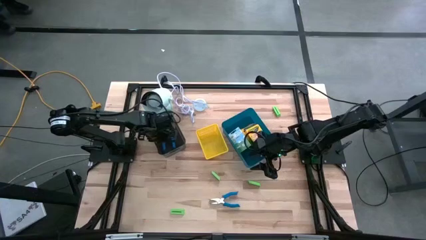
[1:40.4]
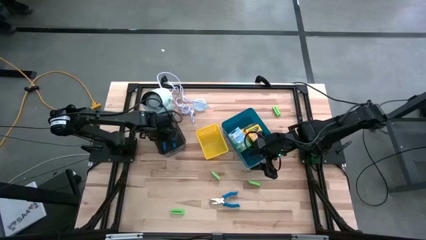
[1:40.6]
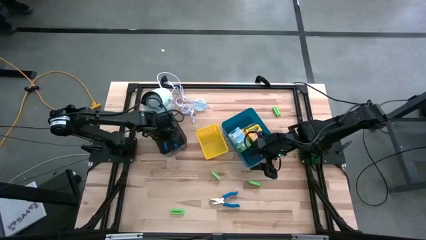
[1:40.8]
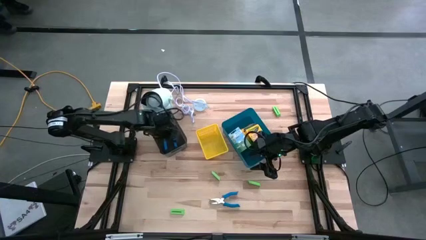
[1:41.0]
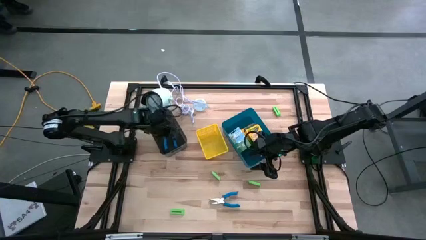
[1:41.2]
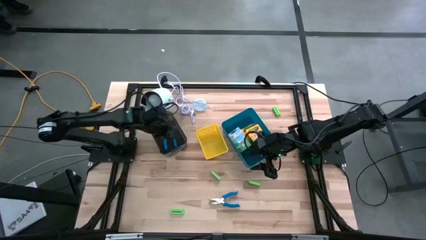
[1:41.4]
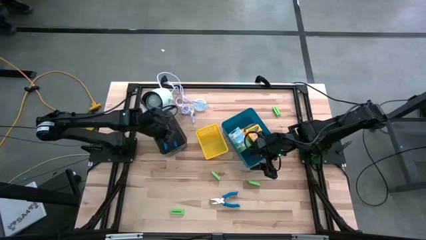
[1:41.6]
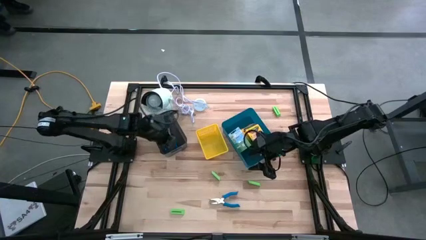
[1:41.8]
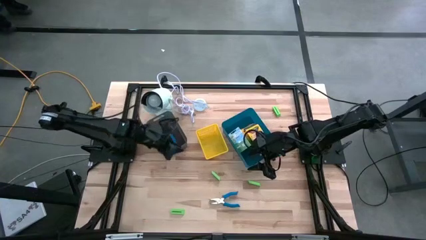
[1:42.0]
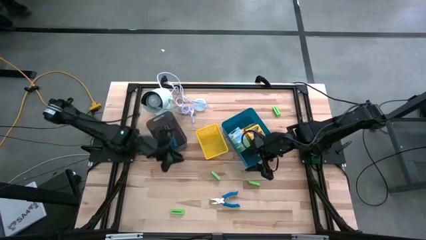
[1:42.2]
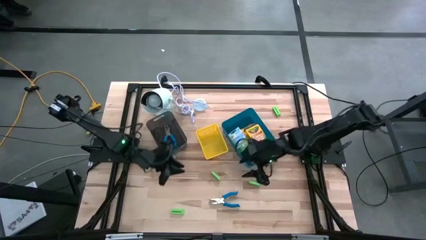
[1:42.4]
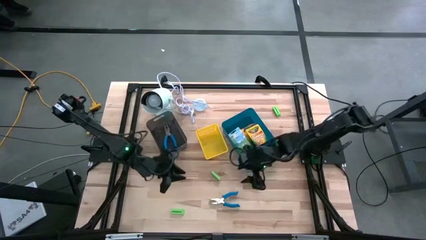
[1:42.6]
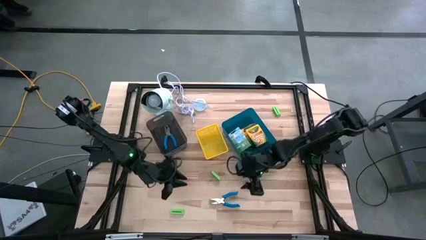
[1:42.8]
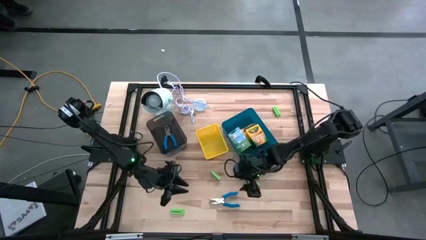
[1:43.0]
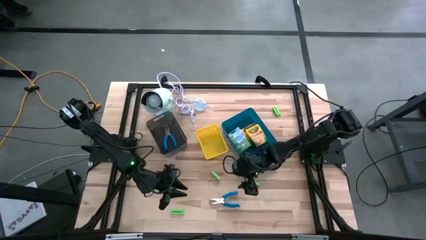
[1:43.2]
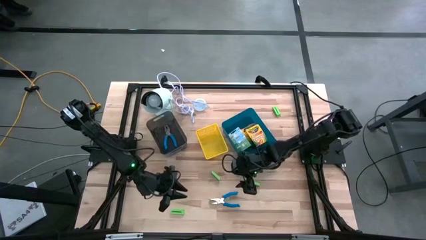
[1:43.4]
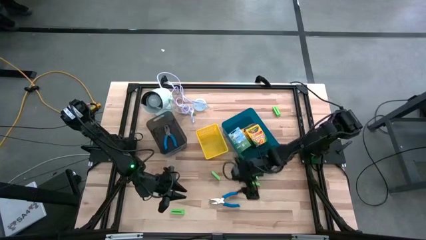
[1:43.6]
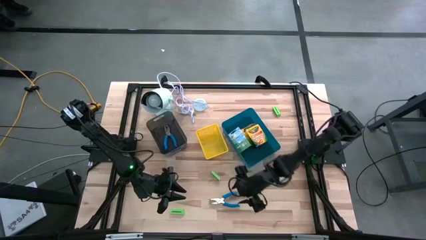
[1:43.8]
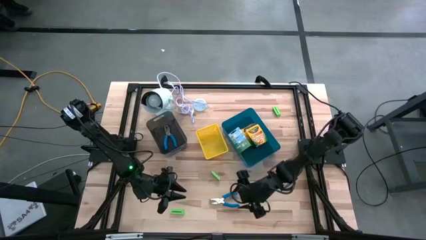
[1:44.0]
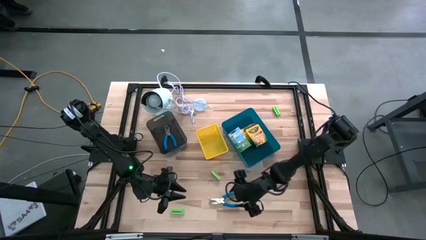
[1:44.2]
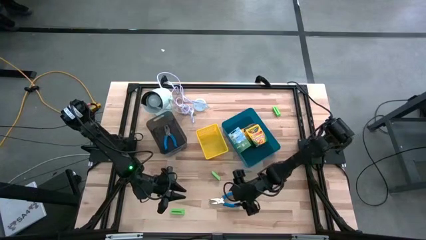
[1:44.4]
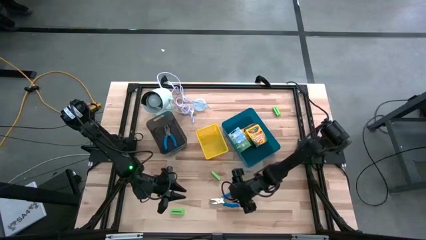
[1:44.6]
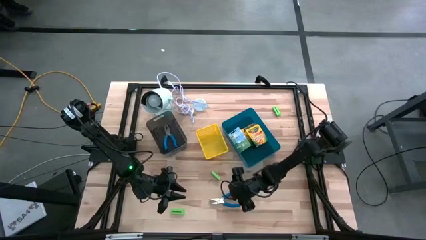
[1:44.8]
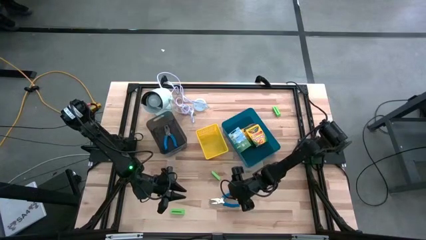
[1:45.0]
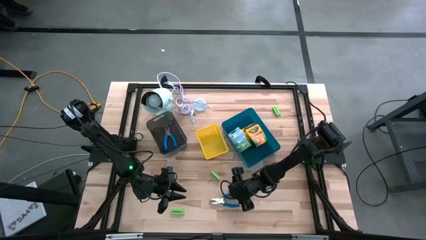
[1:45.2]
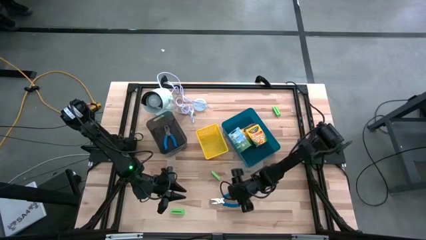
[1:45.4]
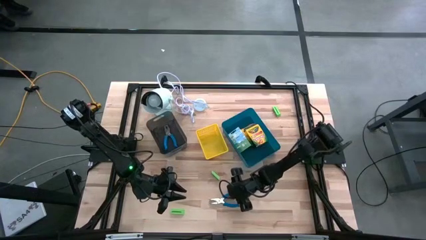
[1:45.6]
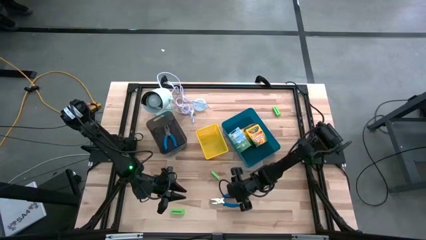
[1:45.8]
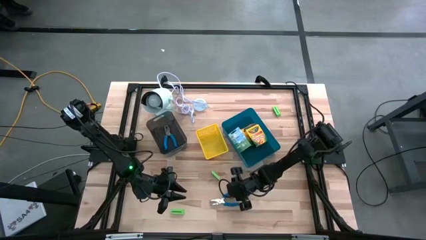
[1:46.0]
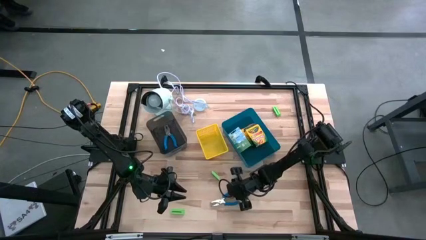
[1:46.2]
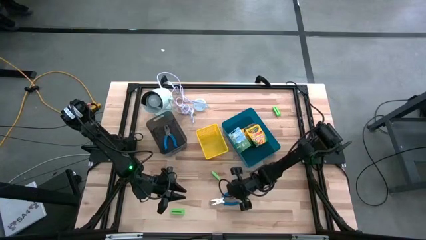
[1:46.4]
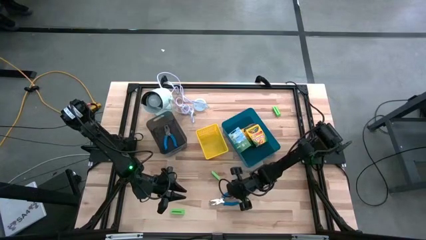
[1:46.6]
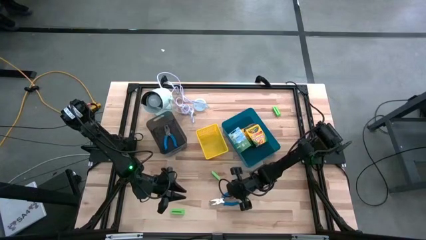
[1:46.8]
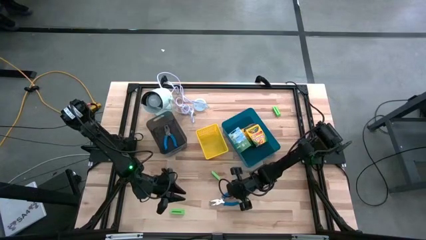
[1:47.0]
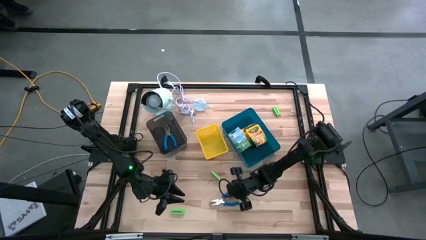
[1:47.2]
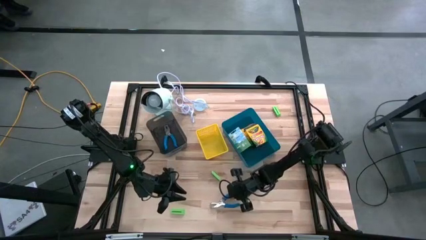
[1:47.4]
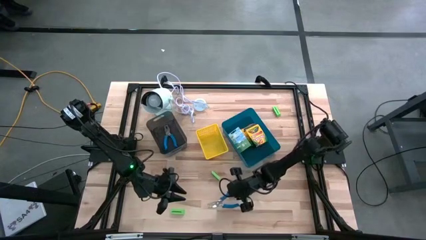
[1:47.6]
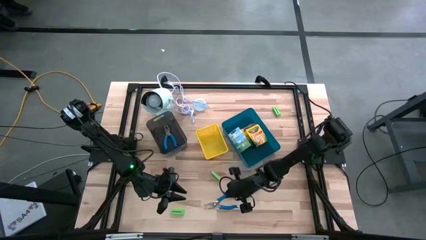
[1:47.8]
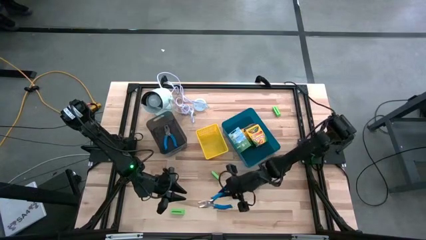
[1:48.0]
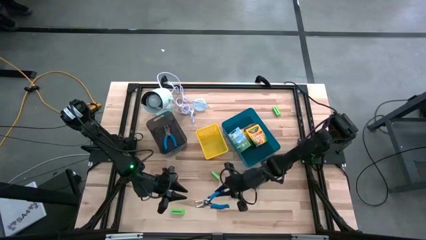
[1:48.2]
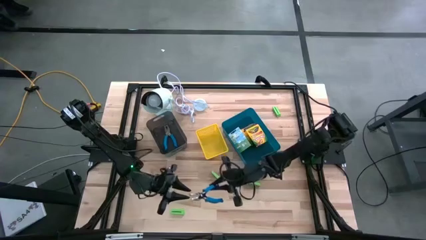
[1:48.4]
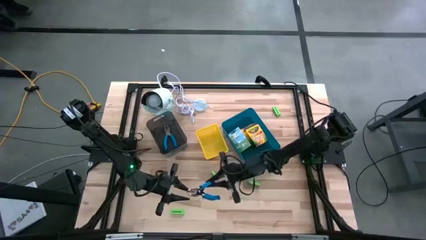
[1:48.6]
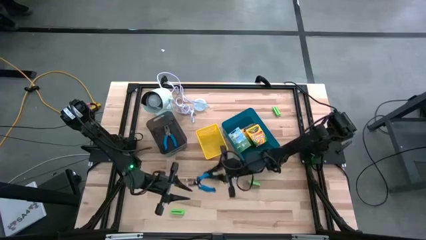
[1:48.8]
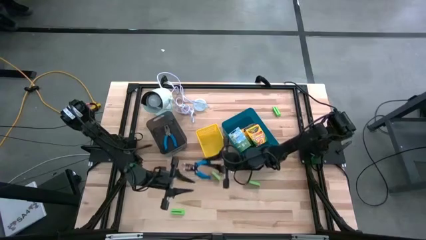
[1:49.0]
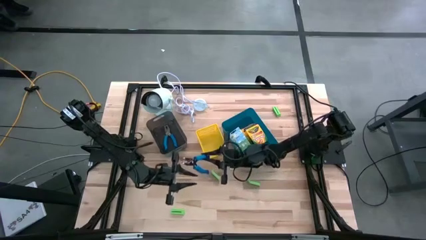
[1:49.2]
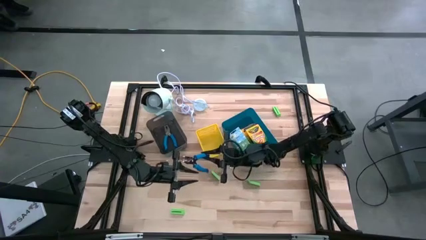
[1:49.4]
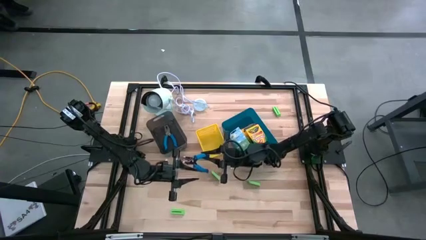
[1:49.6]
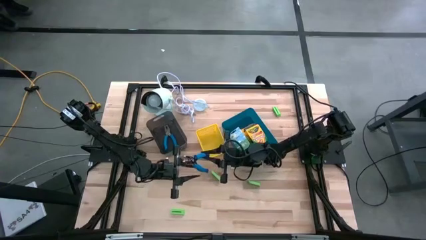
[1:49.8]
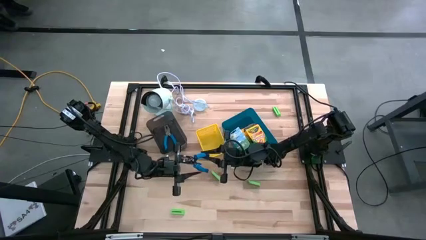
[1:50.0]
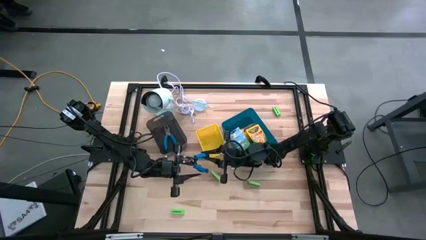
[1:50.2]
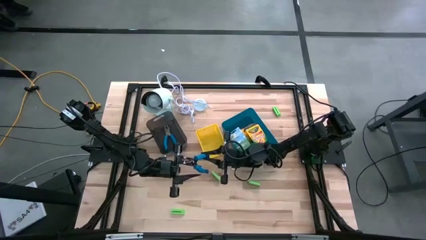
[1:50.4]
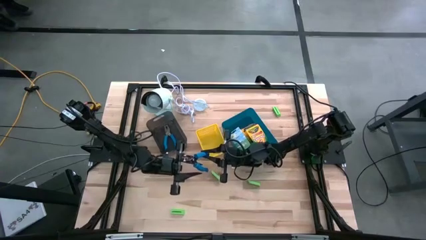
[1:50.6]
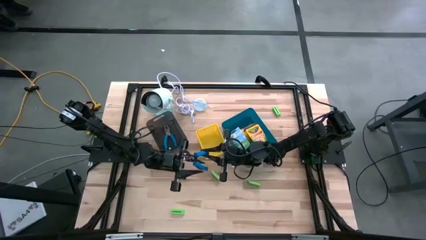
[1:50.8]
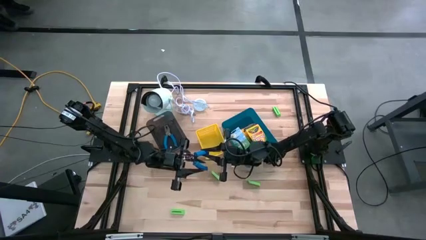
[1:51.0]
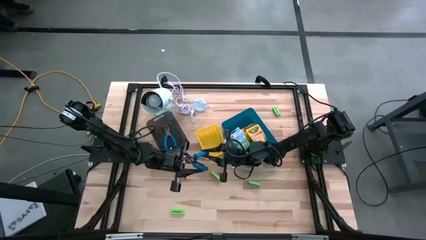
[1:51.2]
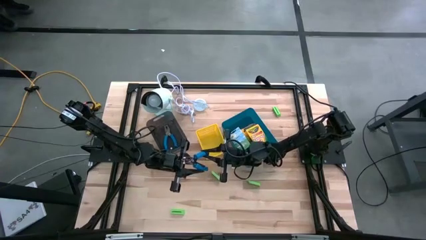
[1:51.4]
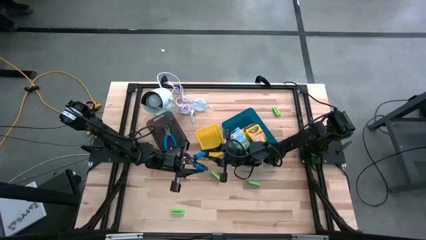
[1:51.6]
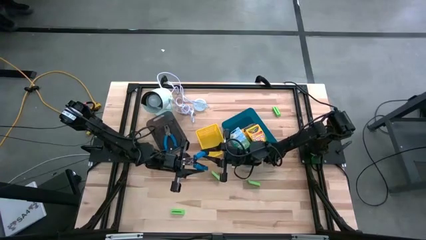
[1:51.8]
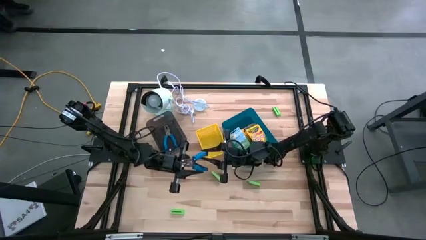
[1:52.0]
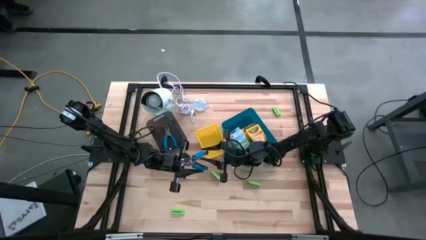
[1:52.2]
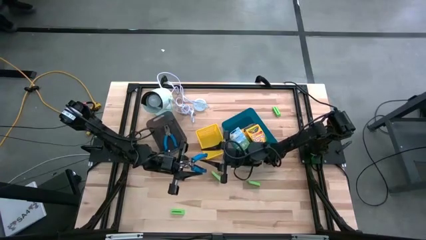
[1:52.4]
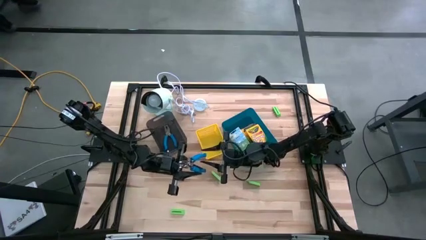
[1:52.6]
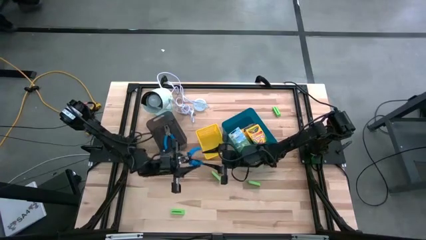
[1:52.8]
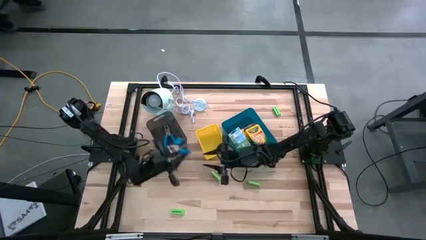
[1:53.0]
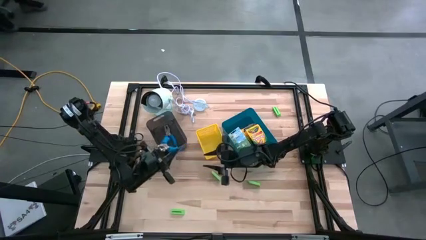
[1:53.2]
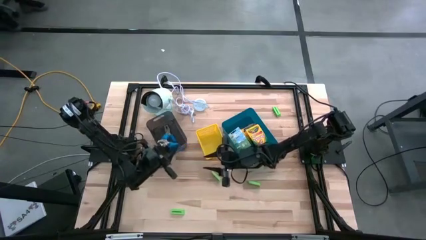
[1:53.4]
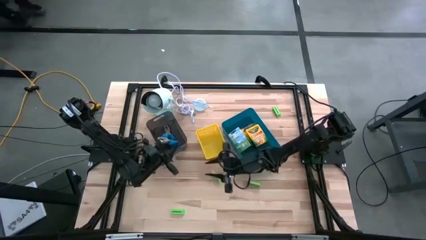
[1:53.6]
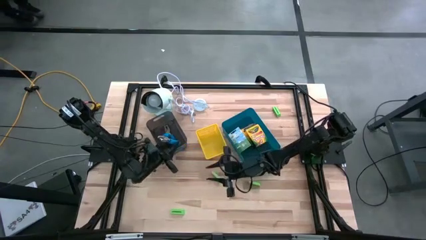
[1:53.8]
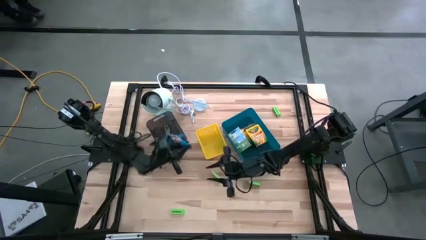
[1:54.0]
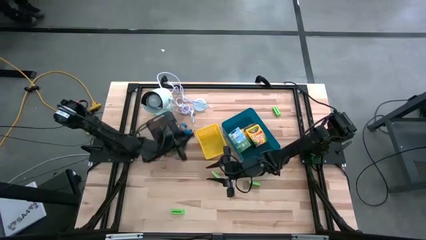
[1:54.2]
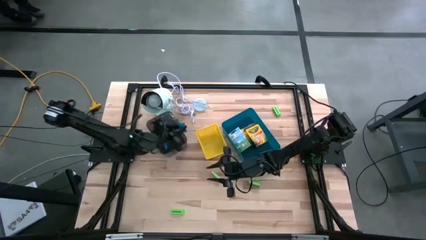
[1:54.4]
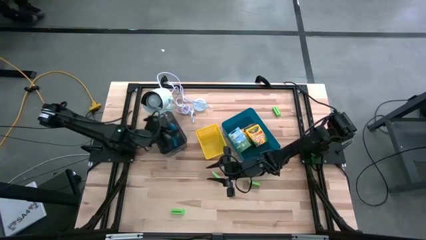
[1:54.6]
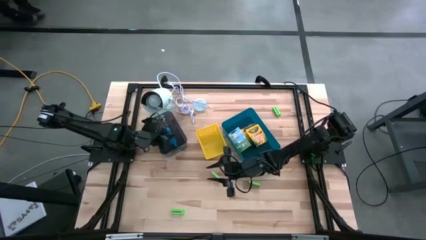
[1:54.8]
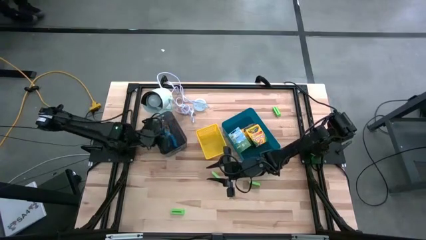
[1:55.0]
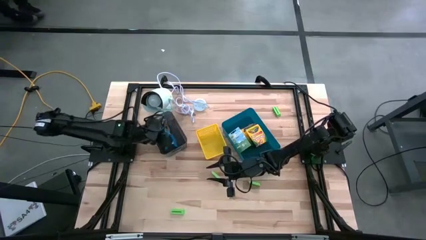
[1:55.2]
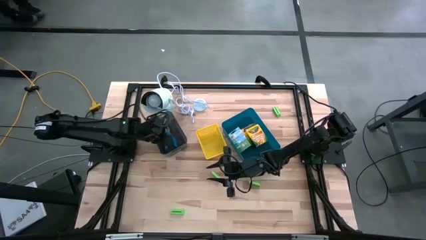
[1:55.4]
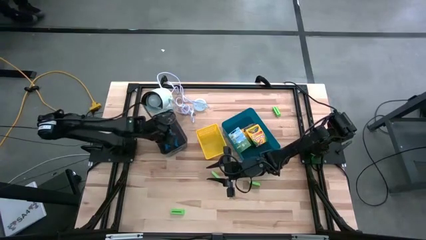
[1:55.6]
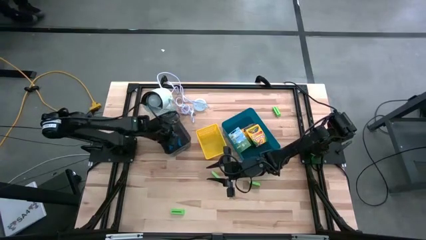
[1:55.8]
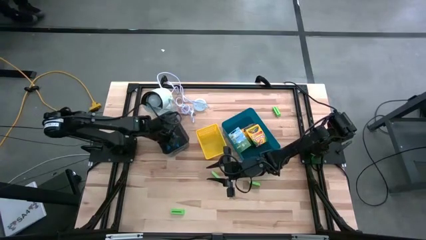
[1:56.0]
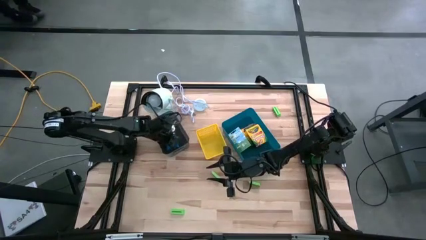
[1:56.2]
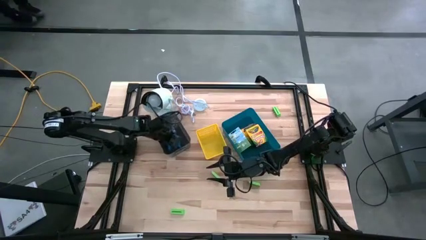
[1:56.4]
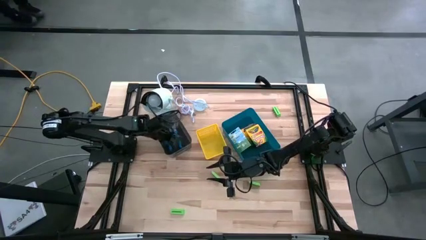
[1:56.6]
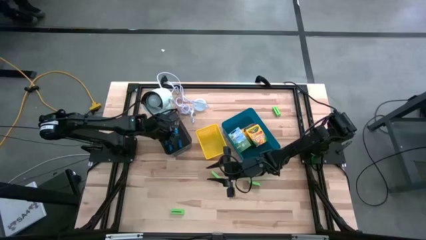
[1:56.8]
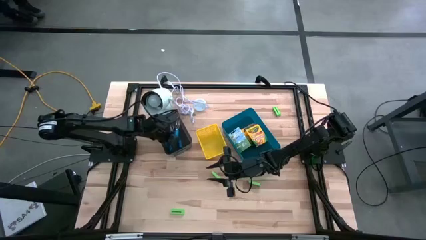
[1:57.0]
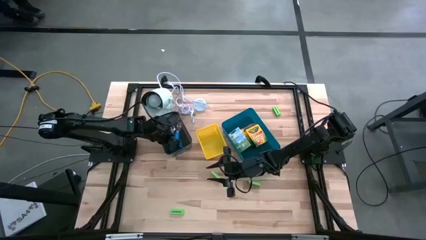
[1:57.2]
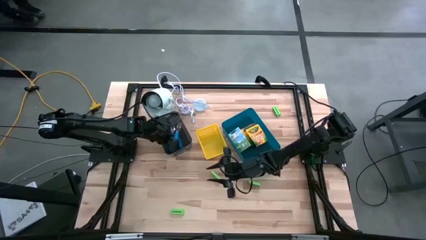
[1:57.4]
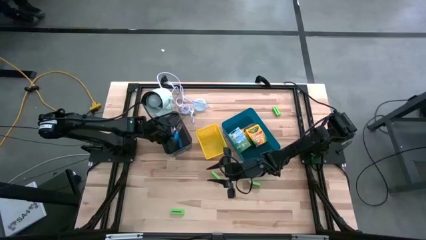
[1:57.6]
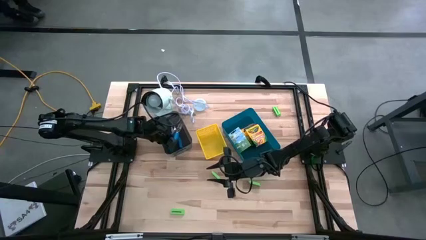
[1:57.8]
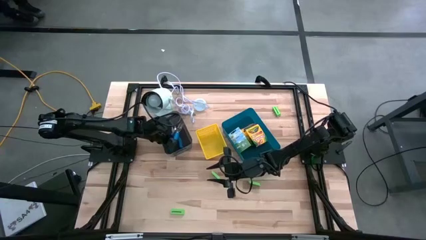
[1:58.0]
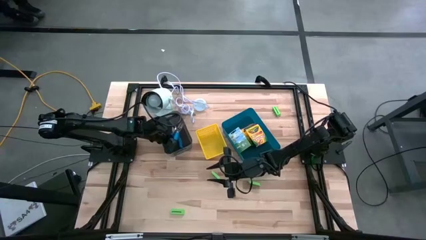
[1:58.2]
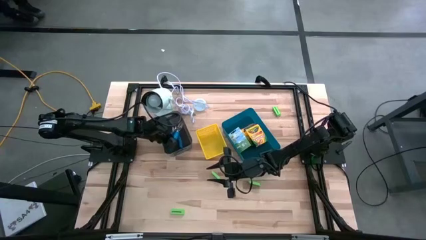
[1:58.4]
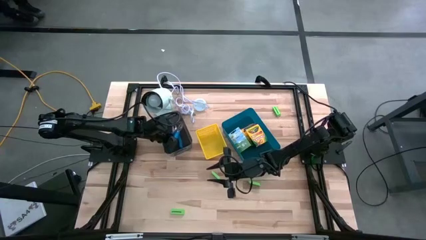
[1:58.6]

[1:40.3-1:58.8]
Task: Pick & Place School Supplies
Put the blue hole puncher into the transparent black bin
